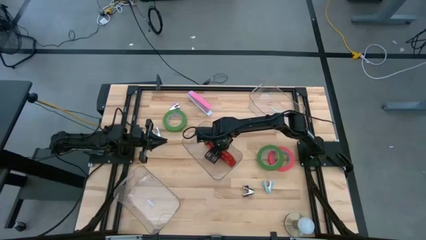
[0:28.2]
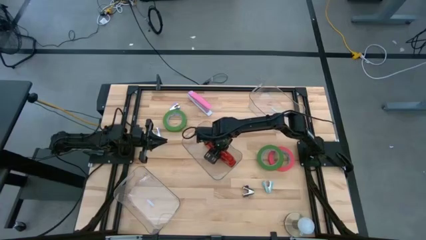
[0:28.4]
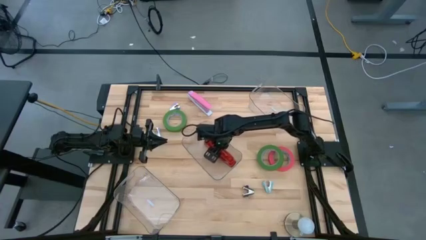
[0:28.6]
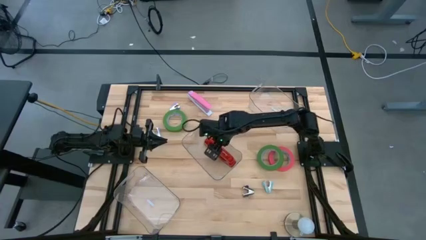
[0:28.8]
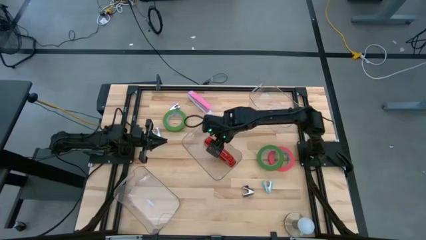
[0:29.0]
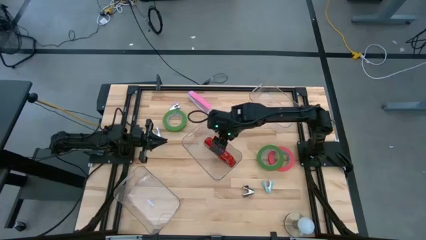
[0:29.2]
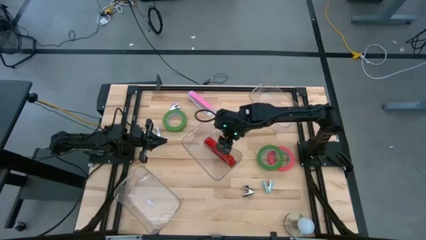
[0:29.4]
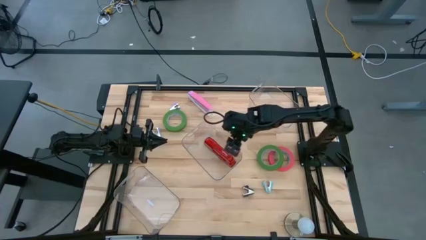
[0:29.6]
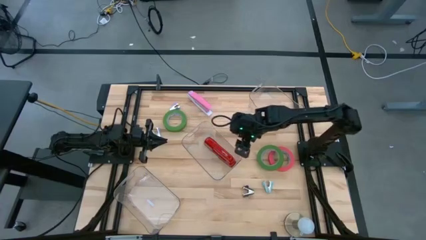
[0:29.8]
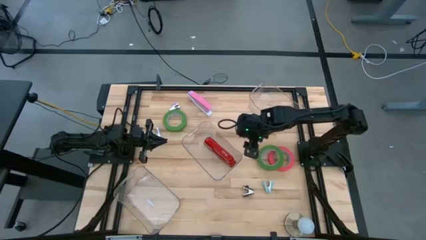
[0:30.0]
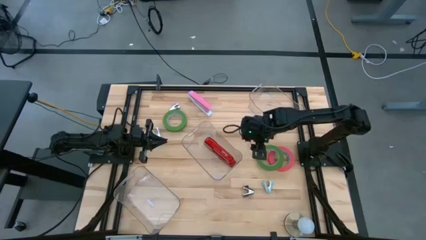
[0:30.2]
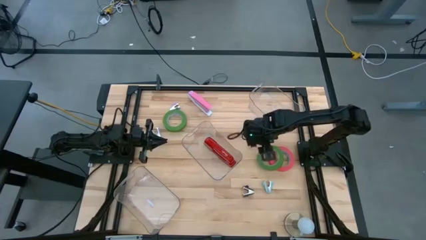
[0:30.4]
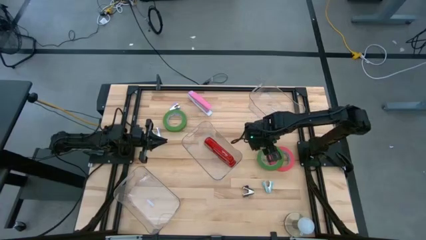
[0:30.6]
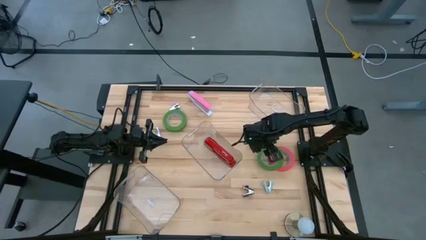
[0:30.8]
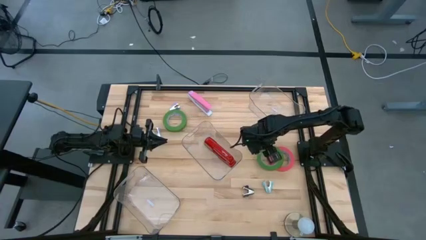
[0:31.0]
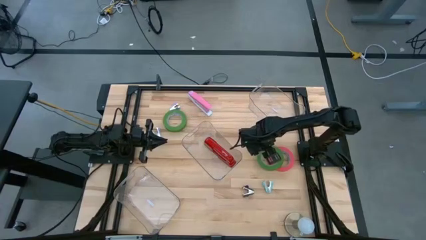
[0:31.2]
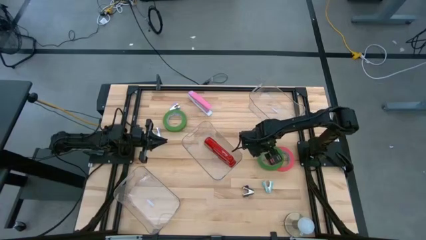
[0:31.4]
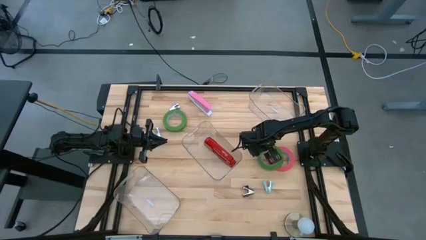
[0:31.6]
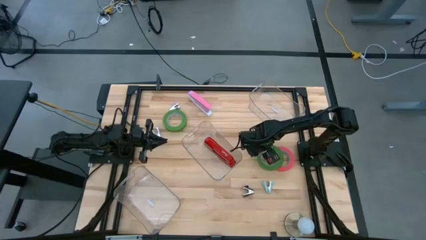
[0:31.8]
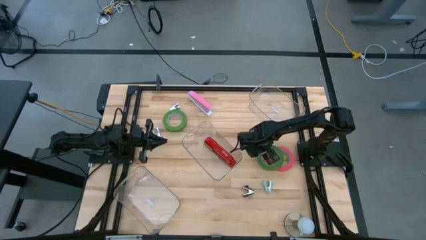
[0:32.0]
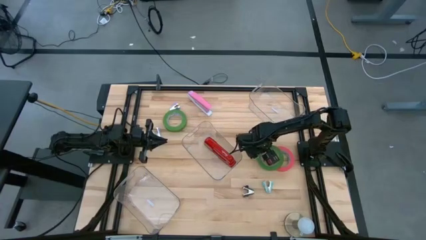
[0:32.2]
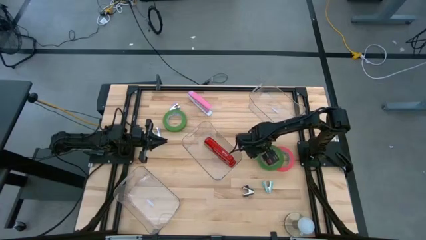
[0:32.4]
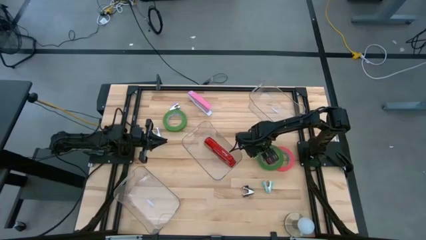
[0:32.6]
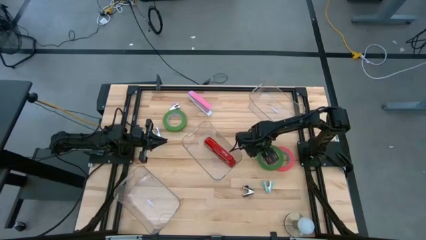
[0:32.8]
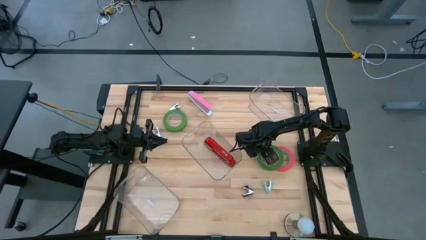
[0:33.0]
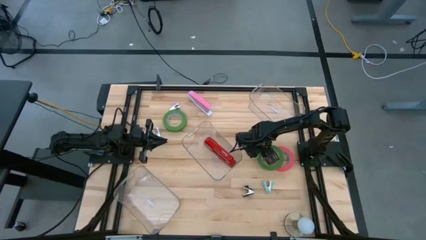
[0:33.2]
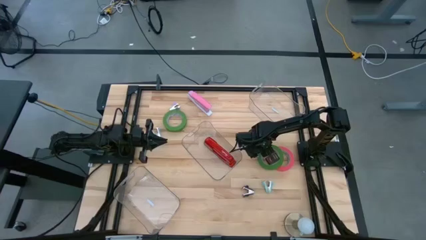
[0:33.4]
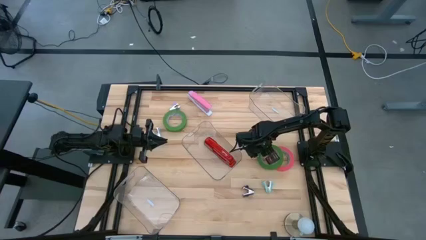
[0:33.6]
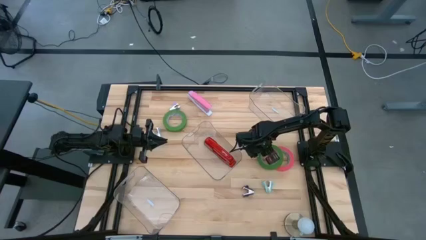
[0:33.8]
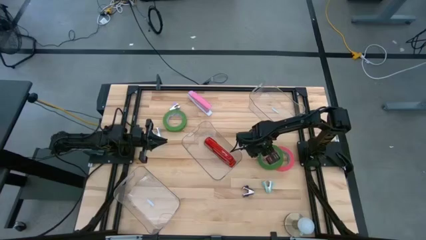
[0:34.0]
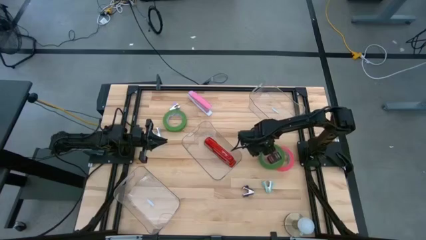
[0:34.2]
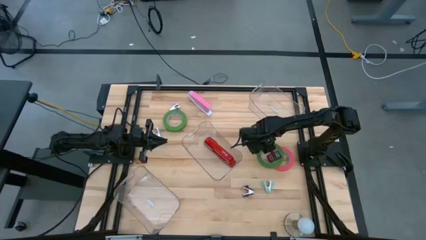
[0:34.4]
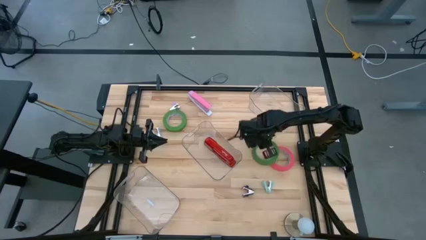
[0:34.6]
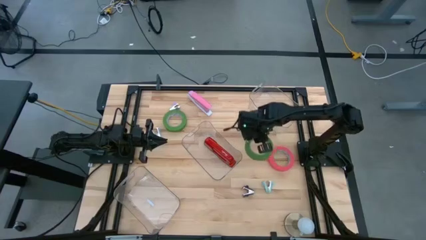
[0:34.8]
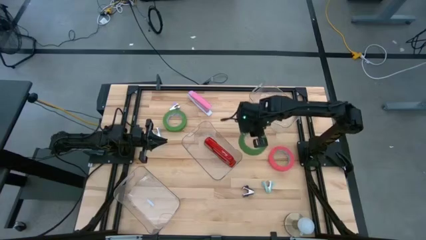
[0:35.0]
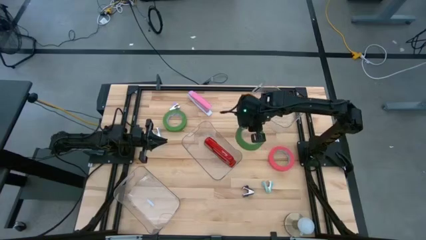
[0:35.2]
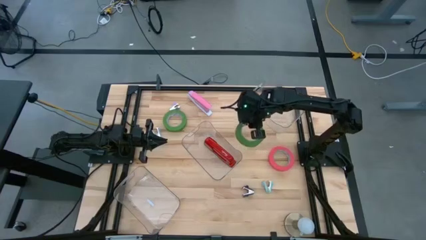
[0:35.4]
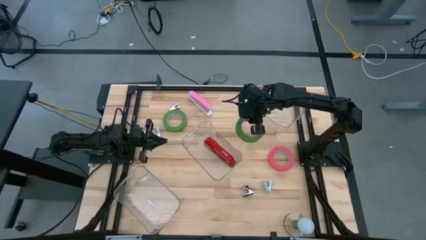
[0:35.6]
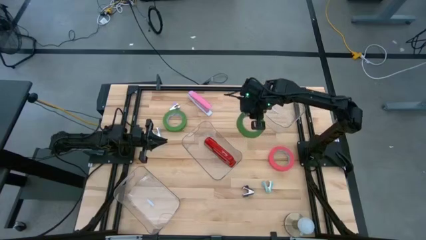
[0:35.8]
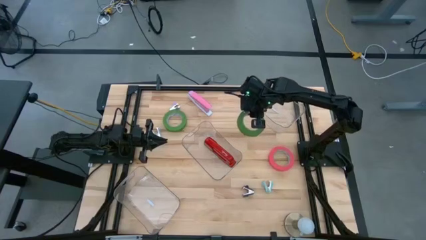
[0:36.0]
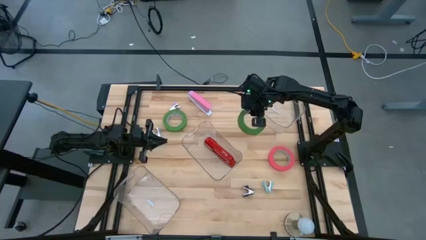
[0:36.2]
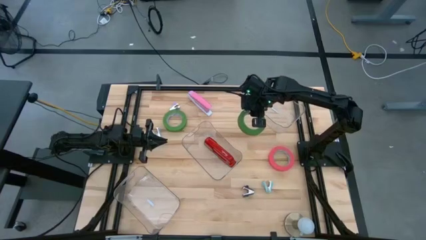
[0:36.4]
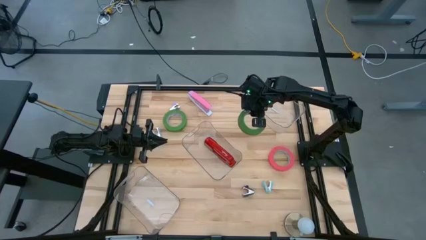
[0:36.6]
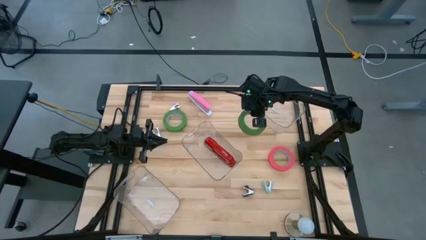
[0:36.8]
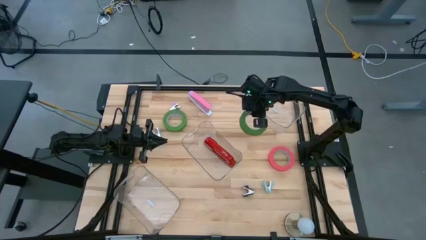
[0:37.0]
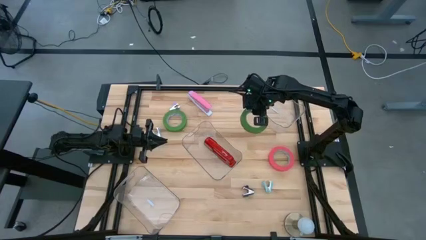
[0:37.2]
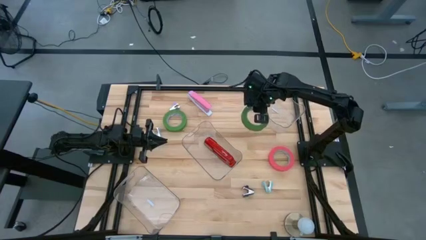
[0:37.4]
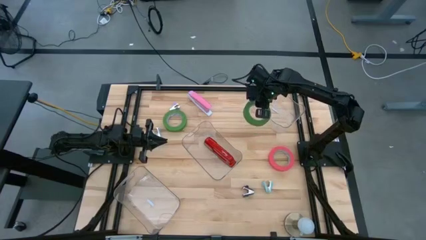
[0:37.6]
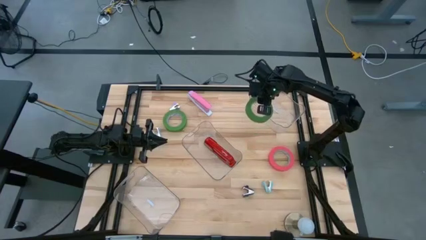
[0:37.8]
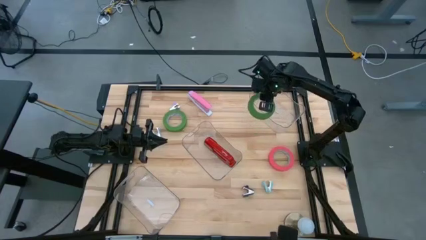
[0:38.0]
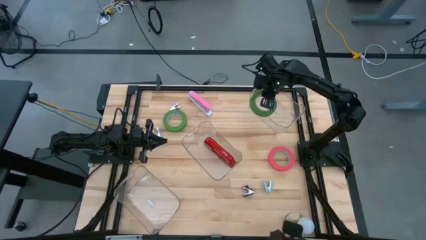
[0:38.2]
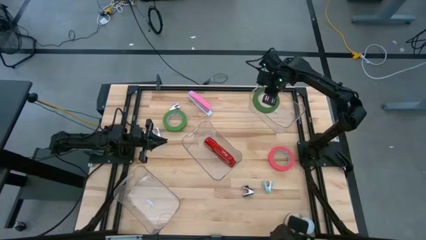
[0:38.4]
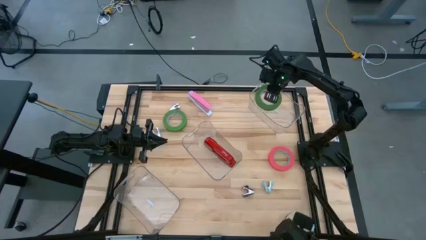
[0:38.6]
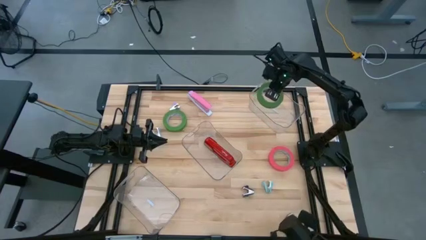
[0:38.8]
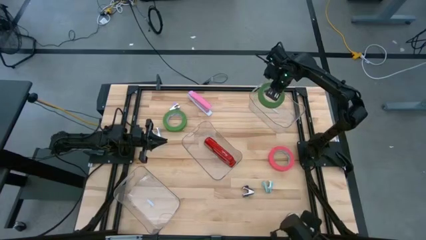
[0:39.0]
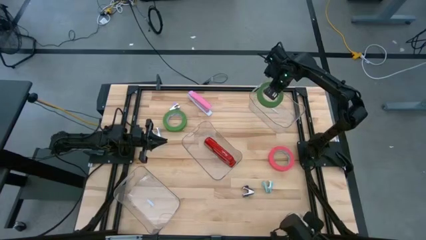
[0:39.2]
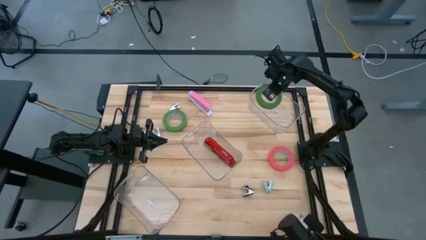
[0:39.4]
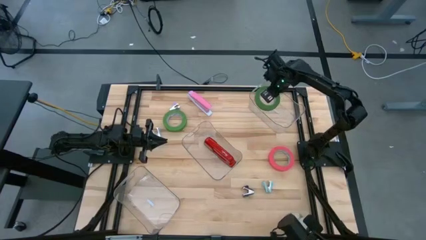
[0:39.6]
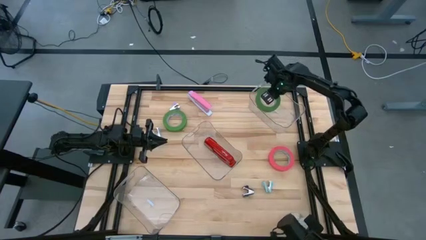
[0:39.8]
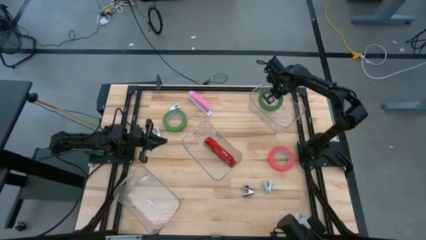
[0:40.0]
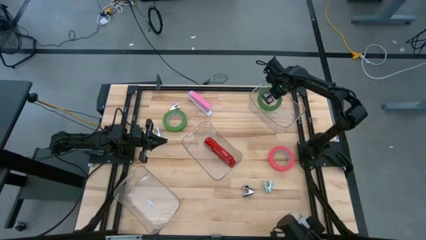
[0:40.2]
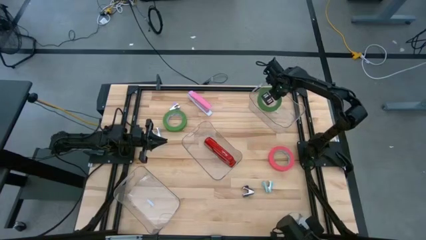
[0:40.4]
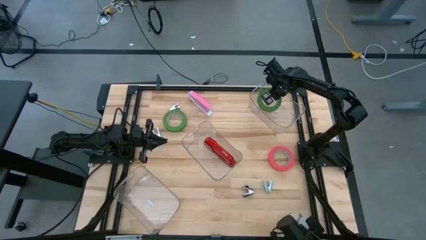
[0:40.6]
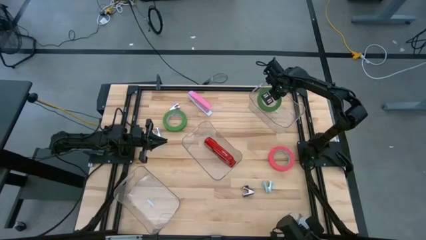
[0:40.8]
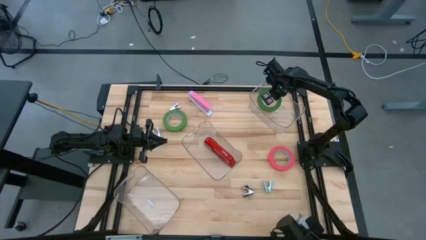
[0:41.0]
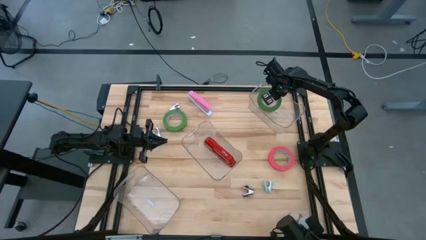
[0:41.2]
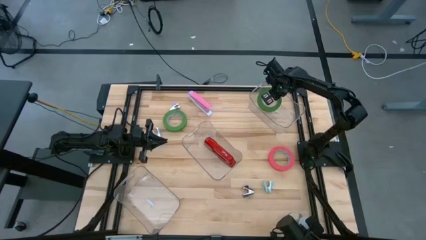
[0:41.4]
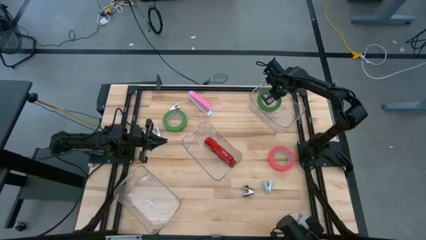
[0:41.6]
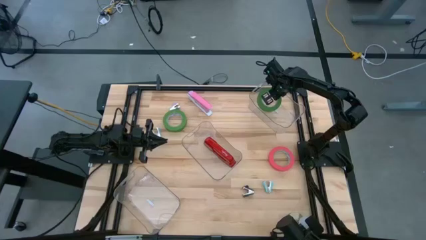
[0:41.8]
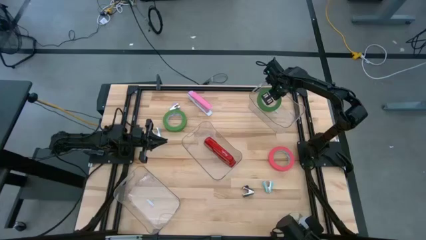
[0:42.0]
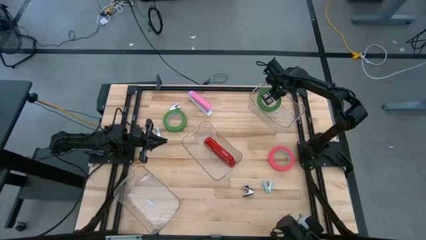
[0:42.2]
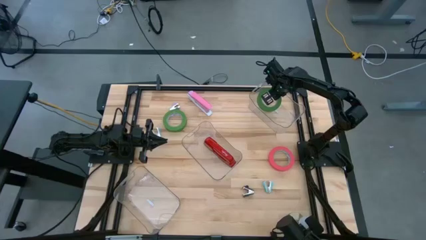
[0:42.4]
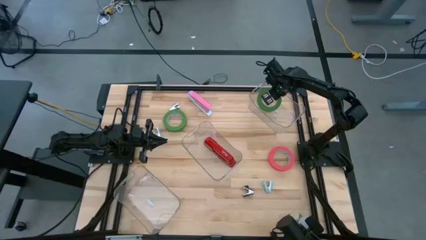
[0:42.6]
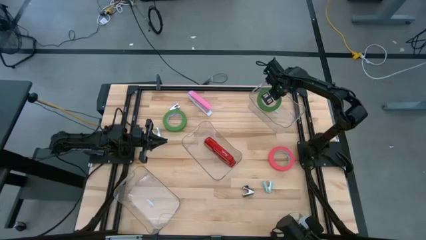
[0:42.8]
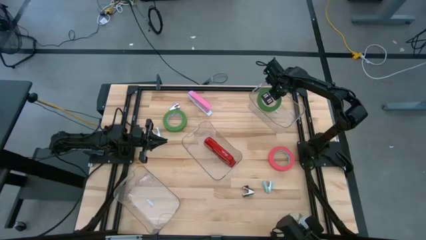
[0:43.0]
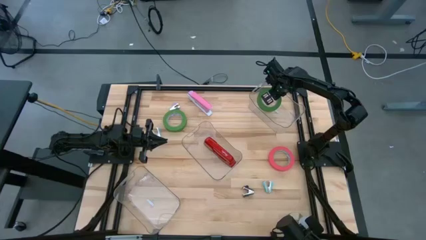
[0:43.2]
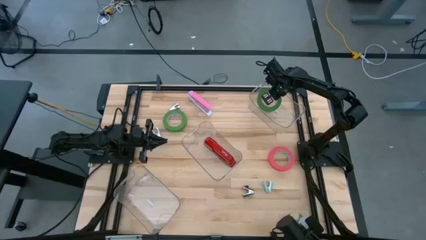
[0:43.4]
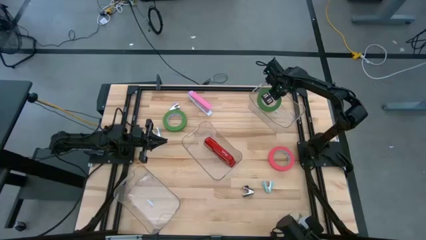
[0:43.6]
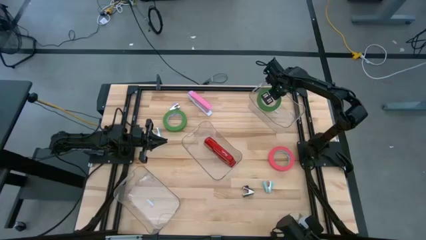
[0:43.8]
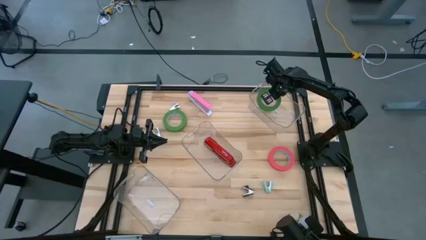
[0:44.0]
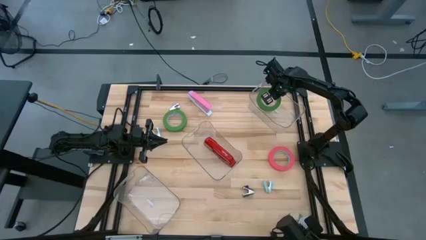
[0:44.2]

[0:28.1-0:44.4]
Task: Pick and place Stapler, Stapler remover, tape
Put the bottom green tape into the top transparent bin
